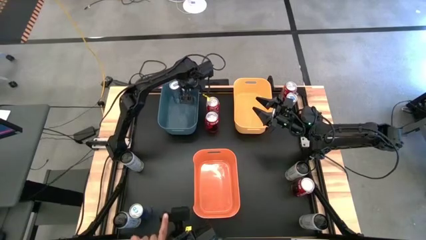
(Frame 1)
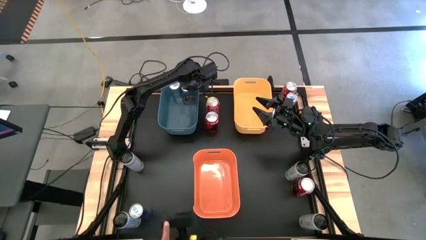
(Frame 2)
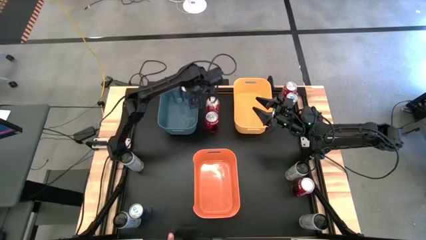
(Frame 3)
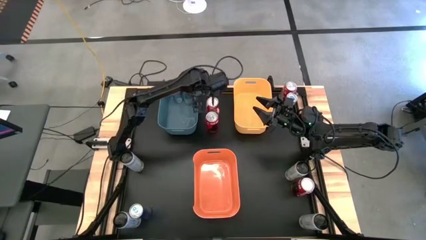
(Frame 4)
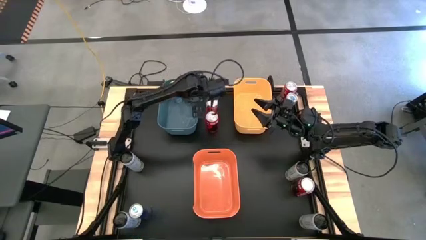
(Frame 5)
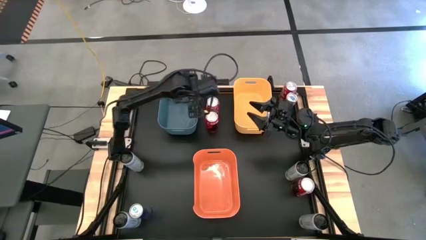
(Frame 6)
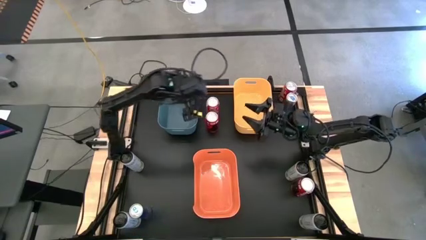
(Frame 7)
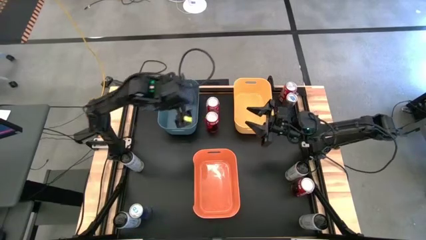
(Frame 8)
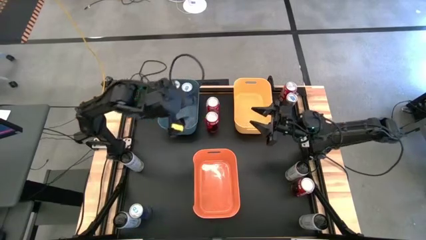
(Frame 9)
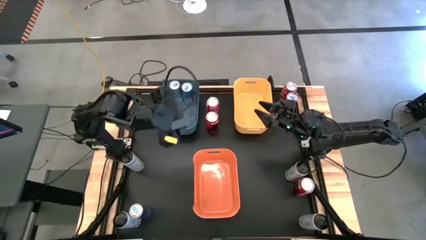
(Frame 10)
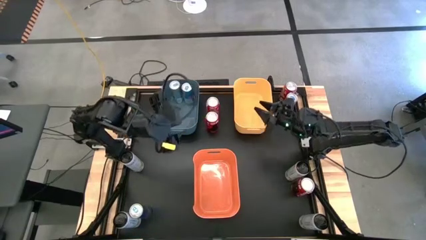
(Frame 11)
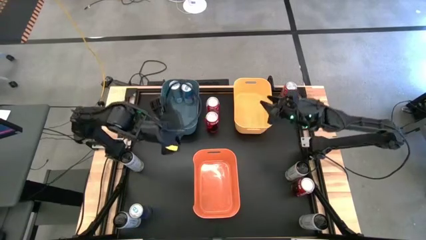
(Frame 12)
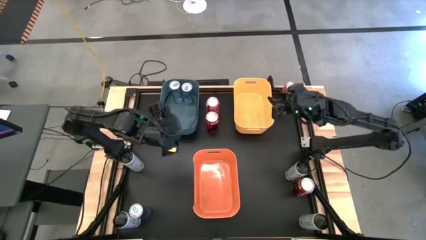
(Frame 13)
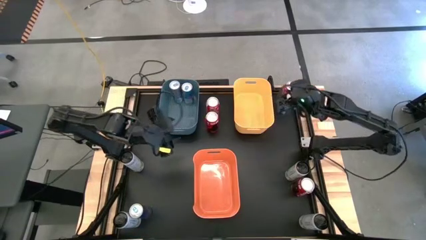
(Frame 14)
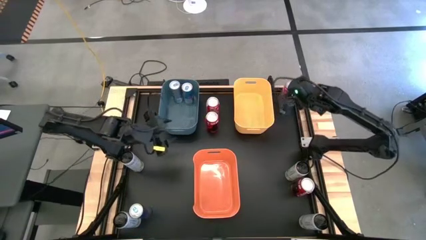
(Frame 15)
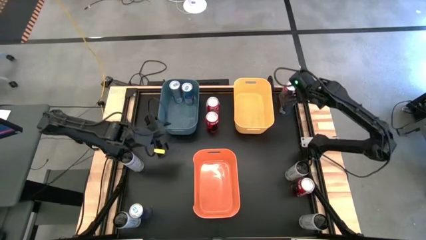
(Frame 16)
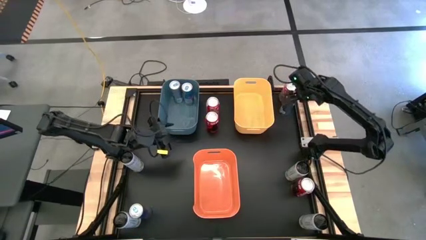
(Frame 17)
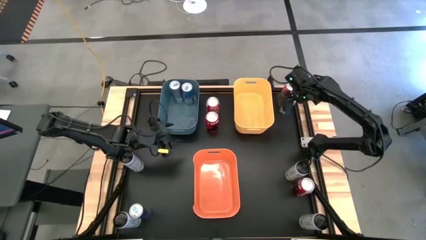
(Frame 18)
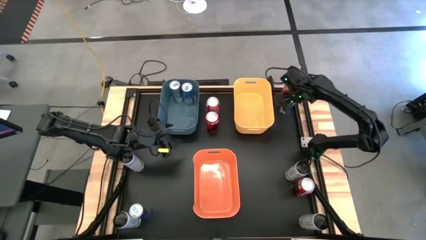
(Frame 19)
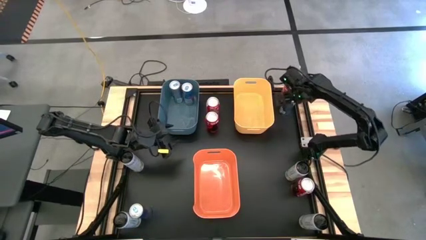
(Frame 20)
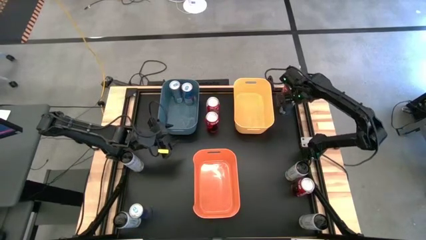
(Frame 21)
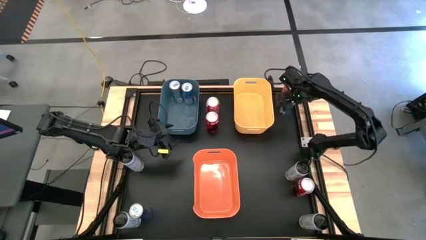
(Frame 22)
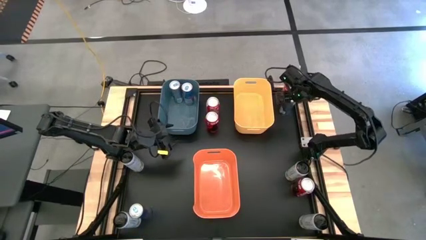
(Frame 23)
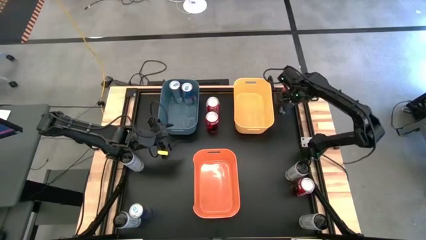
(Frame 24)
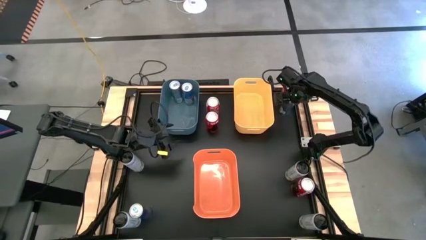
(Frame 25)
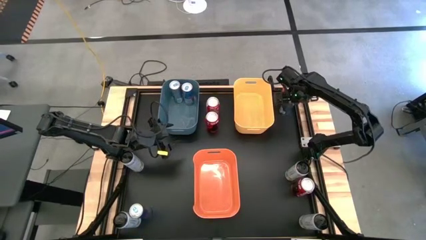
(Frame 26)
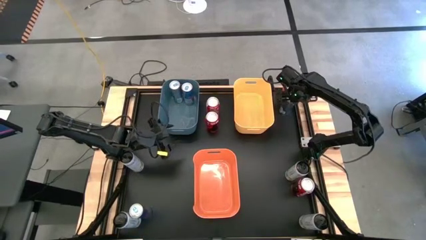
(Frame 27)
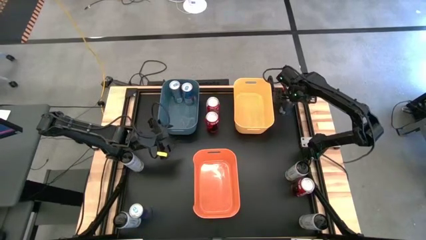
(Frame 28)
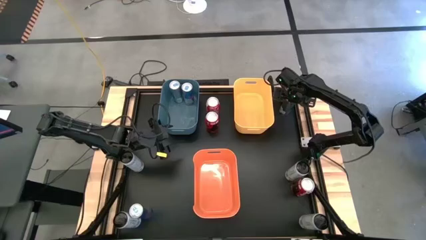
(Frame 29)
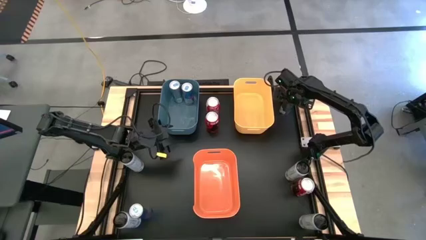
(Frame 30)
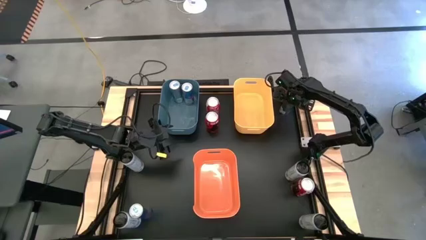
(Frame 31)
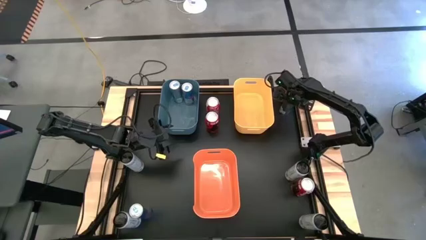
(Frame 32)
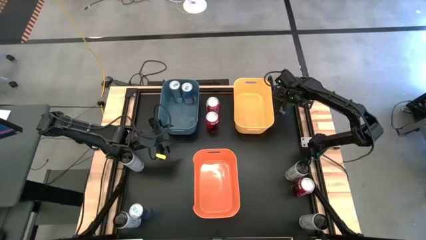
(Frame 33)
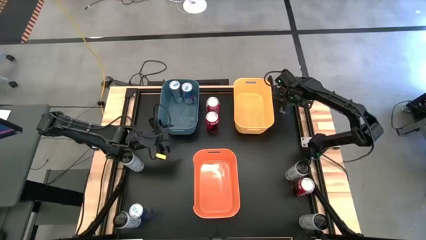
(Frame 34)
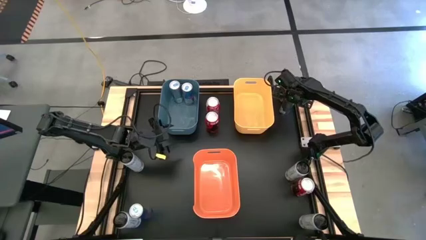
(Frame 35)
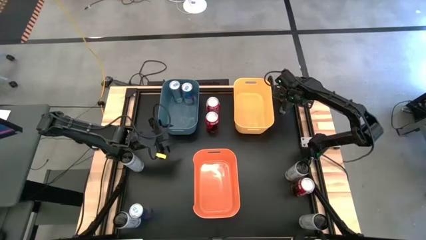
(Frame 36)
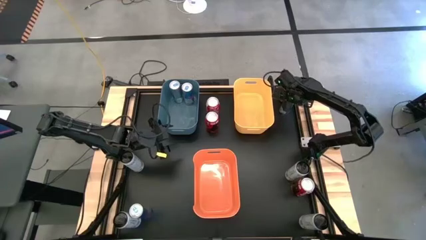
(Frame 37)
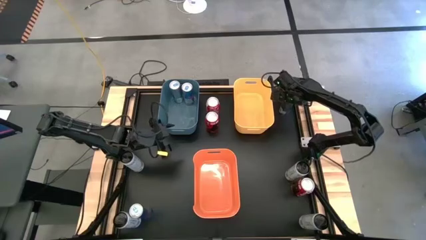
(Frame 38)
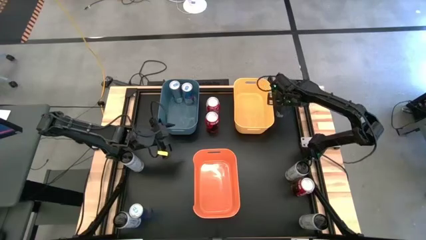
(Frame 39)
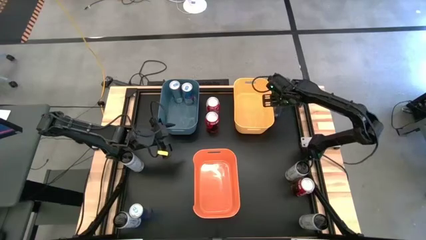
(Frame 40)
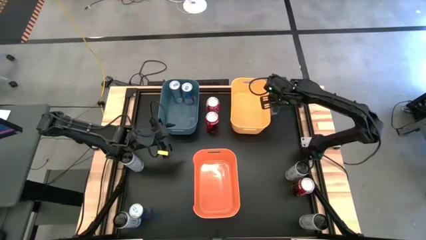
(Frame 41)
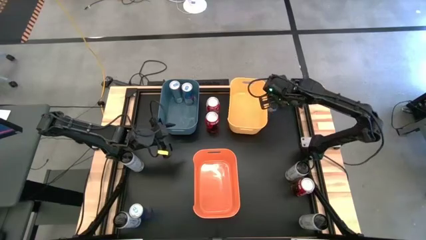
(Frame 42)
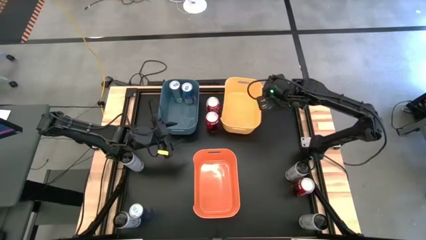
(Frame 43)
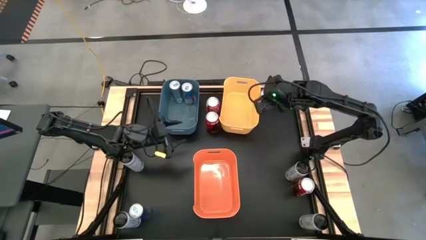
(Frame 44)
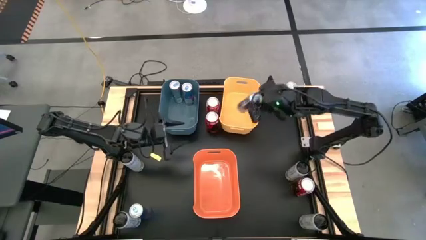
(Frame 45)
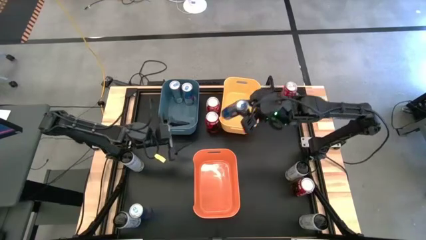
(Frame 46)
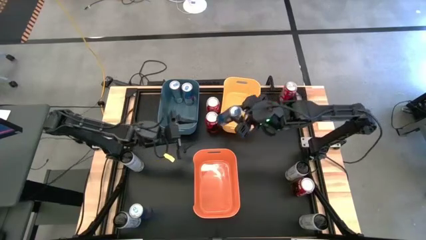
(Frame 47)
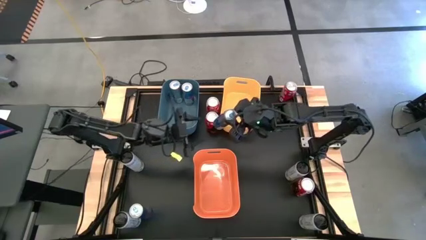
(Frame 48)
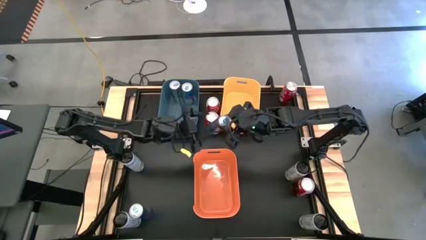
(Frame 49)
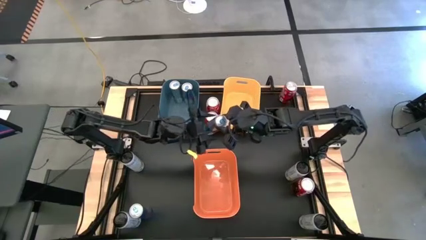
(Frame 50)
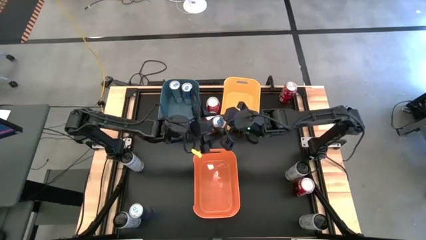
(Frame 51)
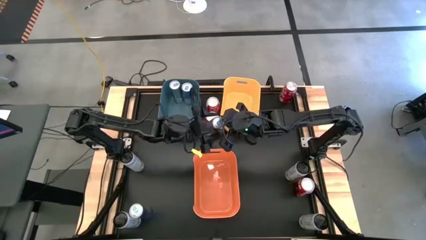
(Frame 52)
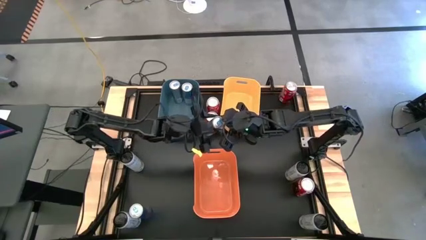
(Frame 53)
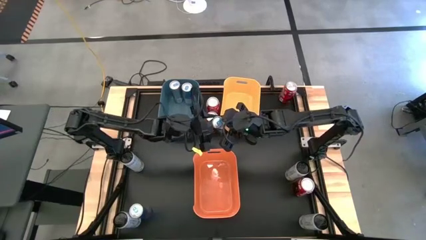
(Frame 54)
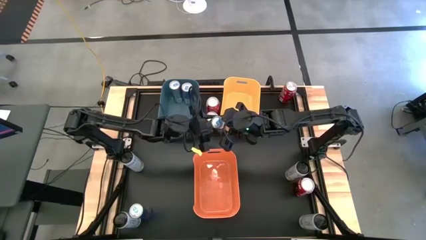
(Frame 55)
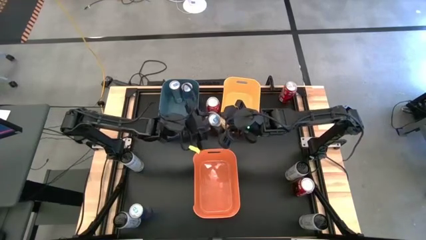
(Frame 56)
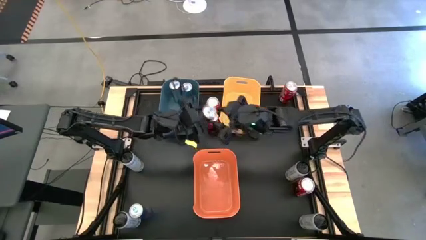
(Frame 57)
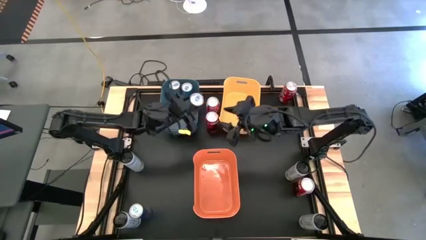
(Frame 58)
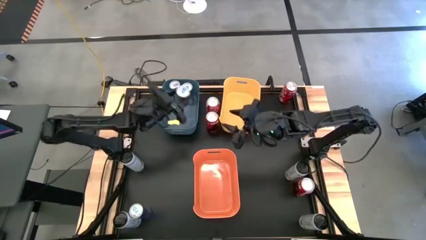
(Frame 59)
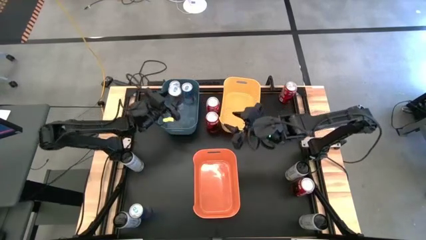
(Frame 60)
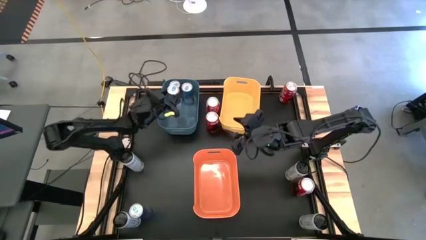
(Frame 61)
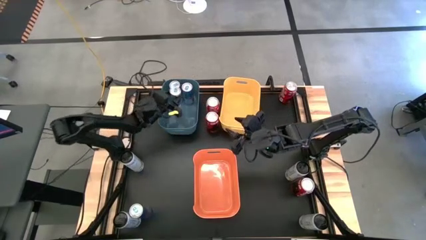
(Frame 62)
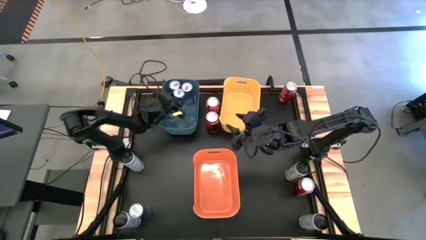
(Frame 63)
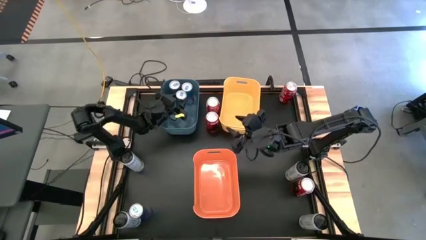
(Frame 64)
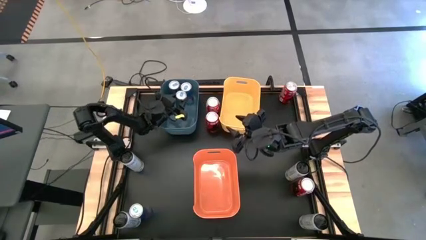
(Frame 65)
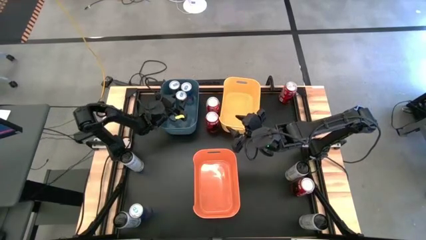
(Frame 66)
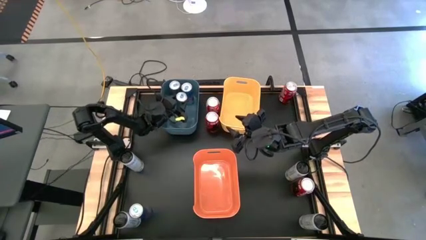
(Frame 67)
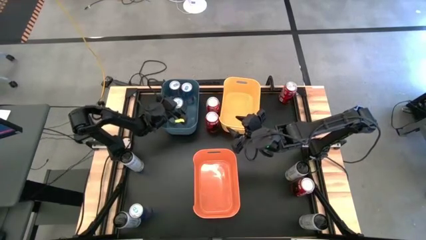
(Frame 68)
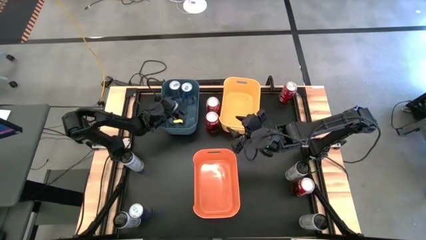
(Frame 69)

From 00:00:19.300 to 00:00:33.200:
Task: Sort soda cans
Put the top blue soda can into the blue bin
